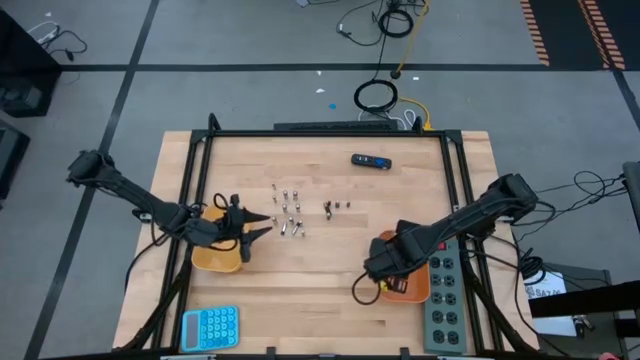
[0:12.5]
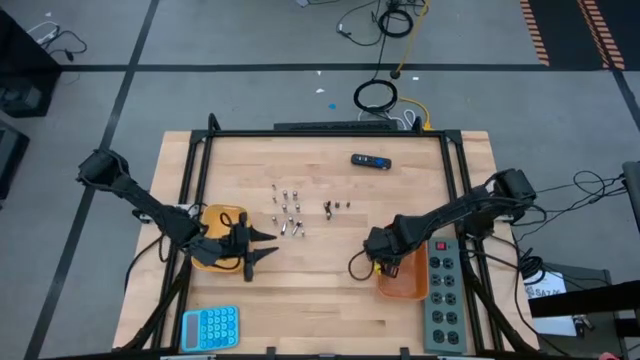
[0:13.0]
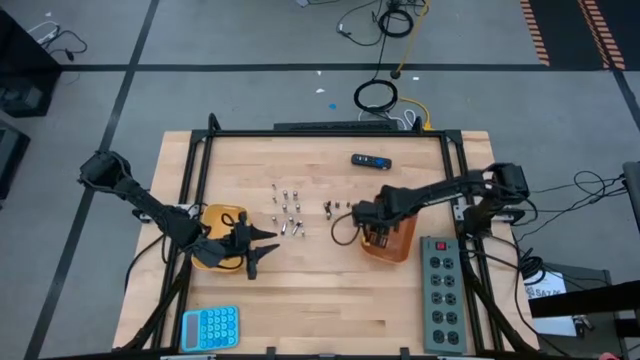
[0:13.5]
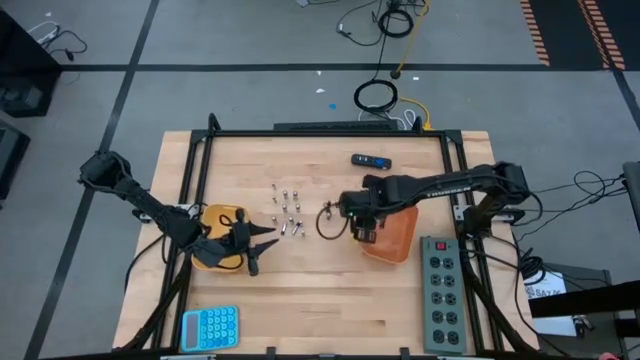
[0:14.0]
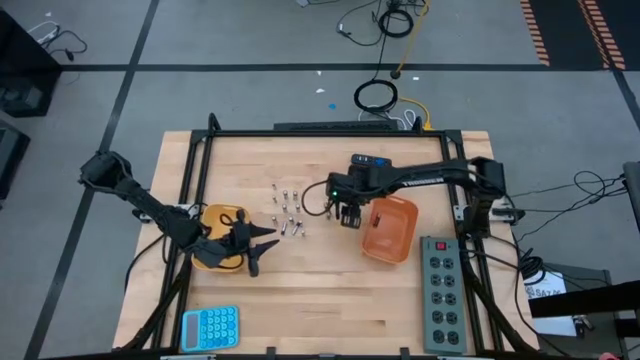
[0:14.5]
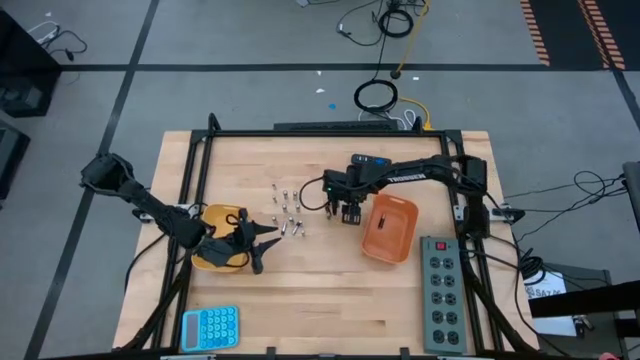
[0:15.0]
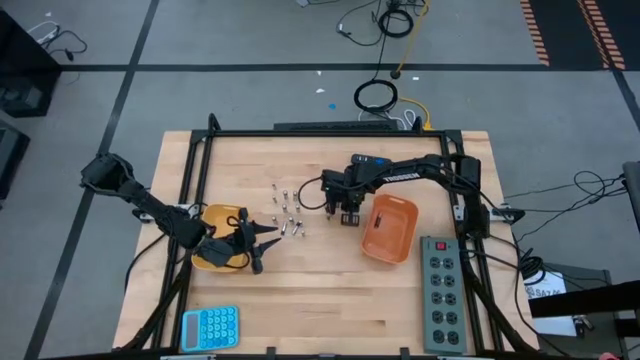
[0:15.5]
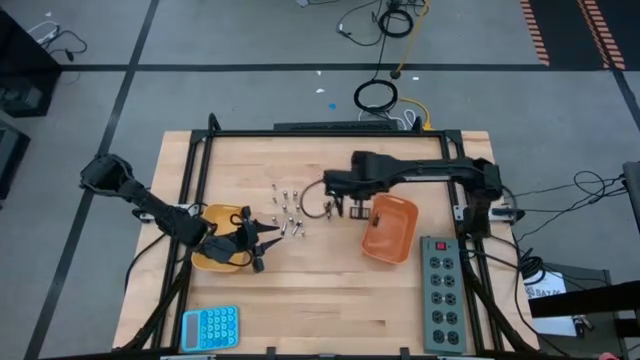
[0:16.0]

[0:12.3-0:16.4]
Task: Sort batteries
Put the black battery into the orange bin

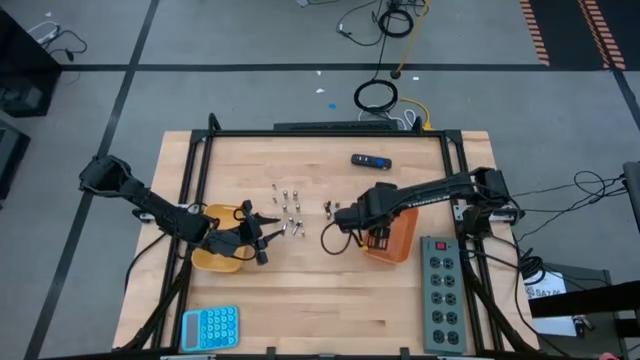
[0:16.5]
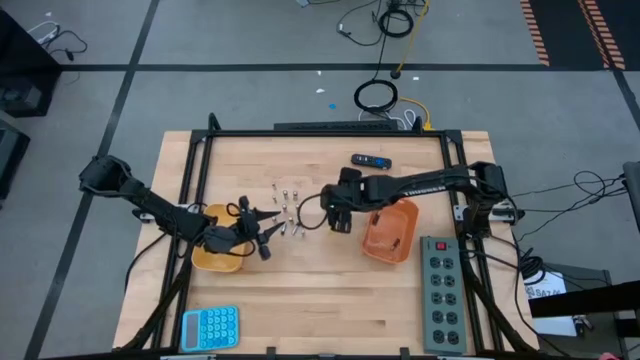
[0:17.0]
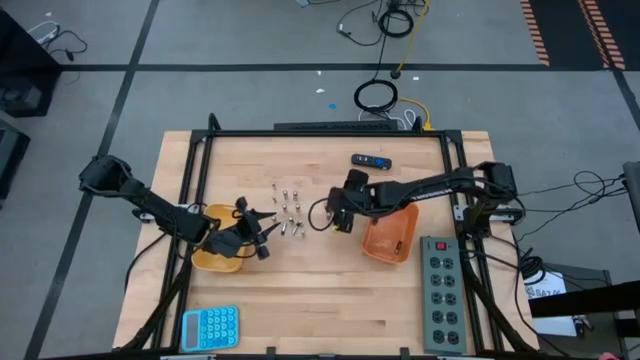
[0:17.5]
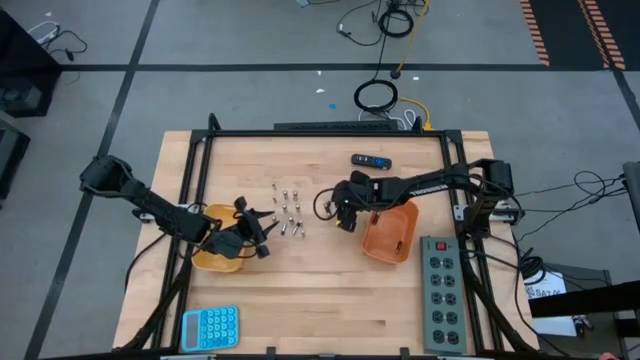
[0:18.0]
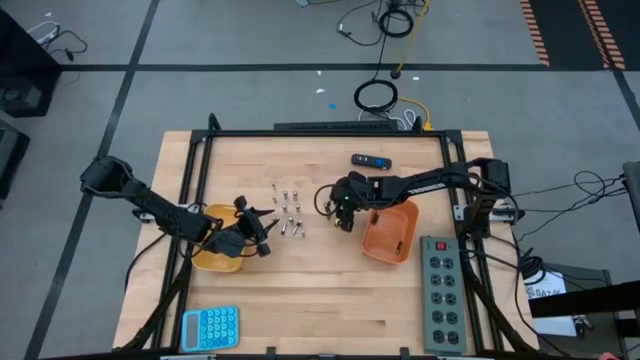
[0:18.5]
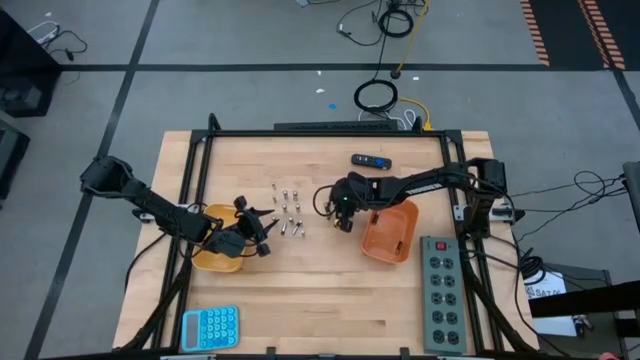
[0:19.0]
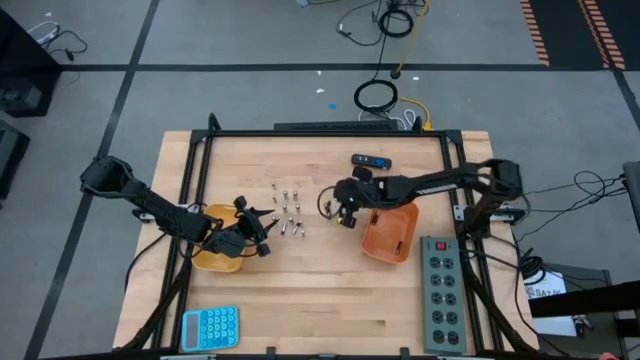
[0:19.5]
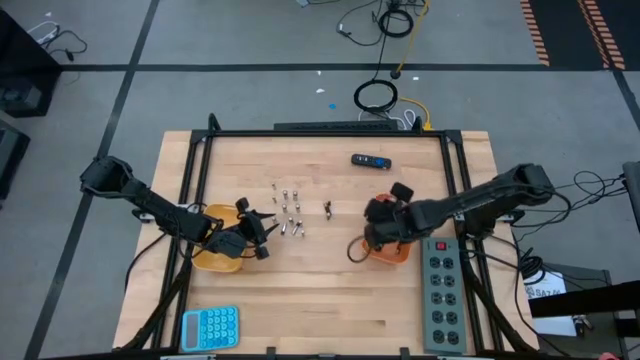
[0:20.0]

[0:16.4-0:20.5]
Put the black battery into the orange bin

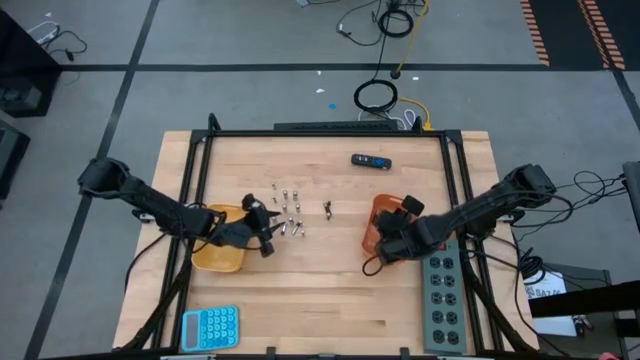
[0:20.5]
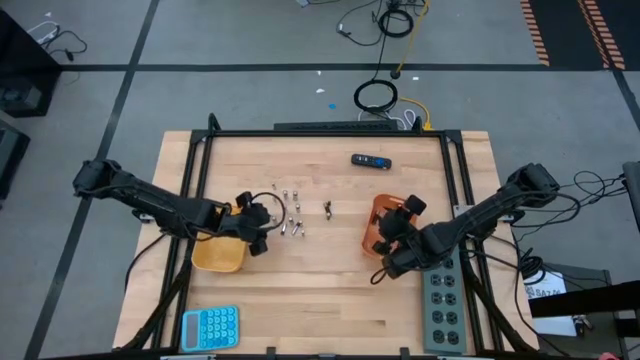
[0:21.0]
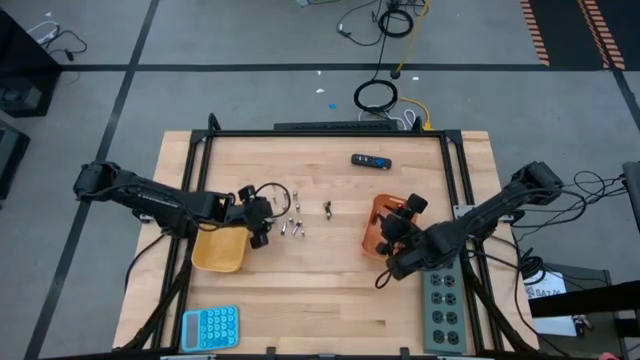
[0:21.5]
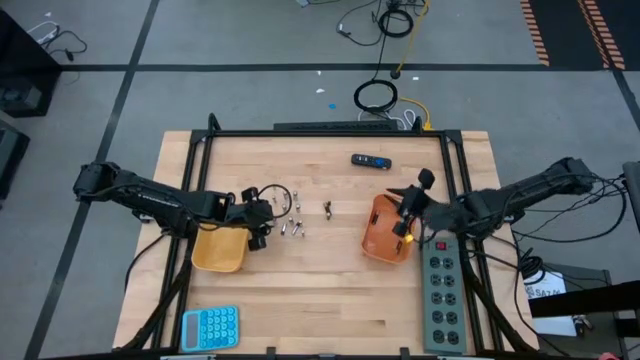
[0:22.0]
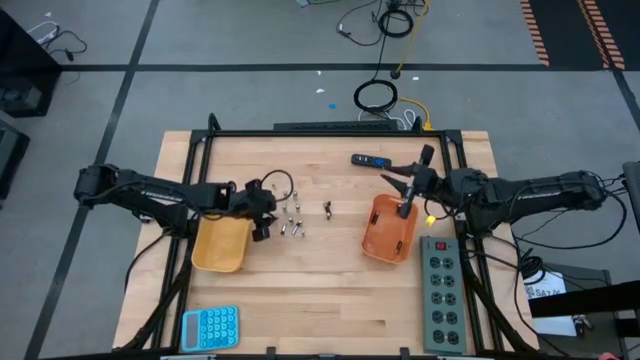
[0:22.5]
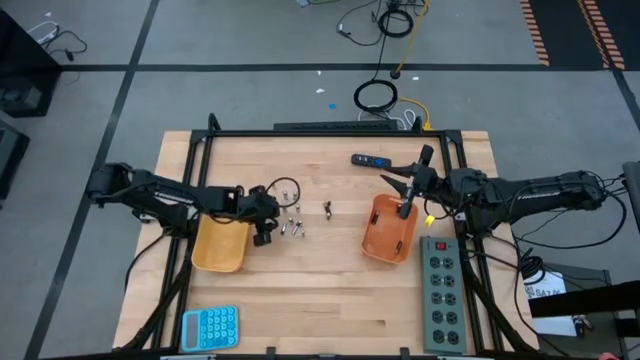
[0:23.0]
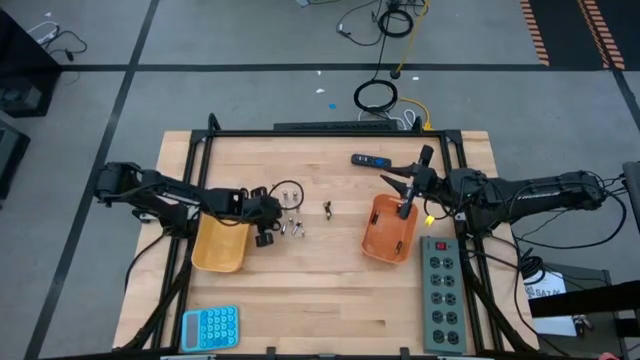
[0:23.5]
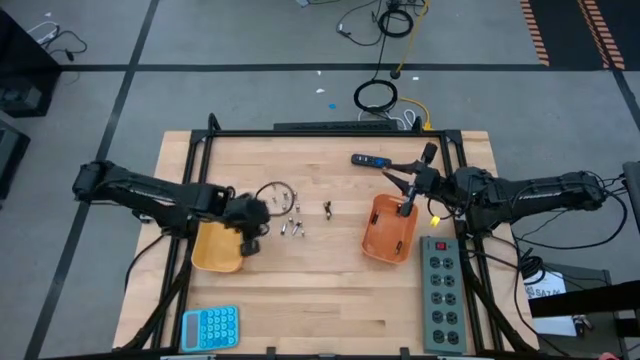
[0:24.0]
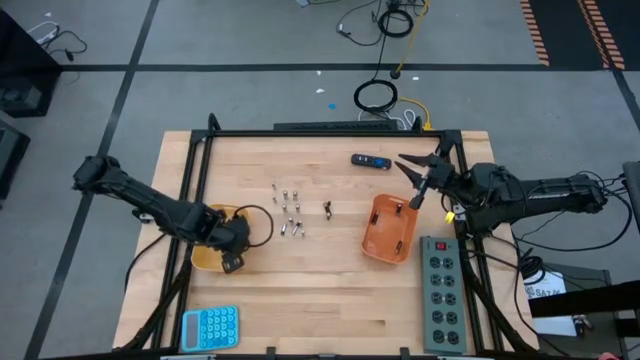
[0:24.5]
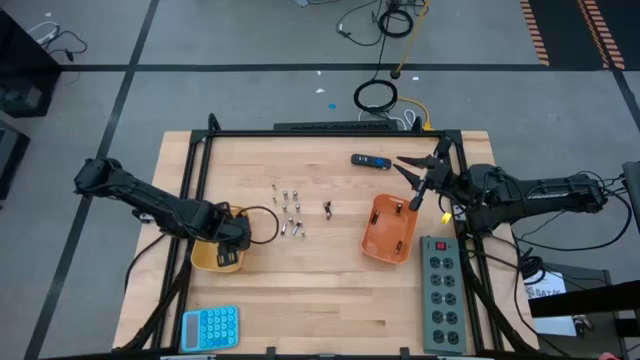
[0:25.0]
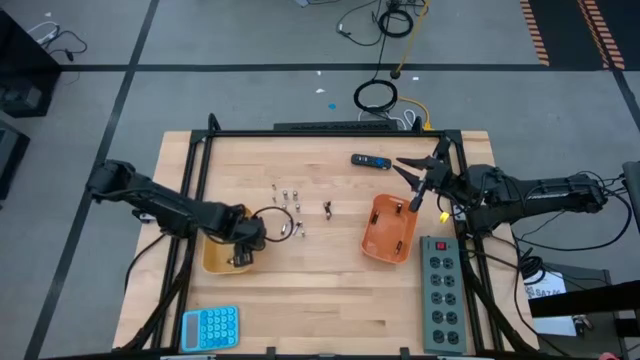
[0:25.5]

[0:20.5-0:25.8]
Put the silver battery into the yellow bin

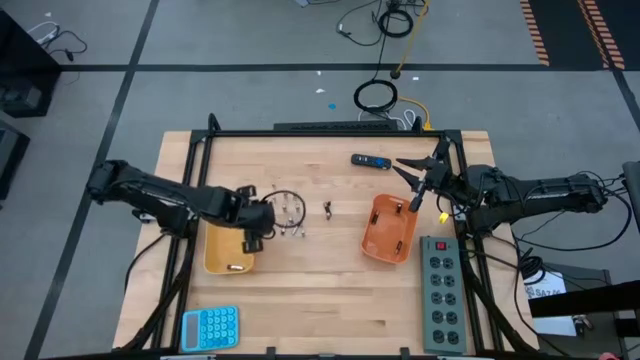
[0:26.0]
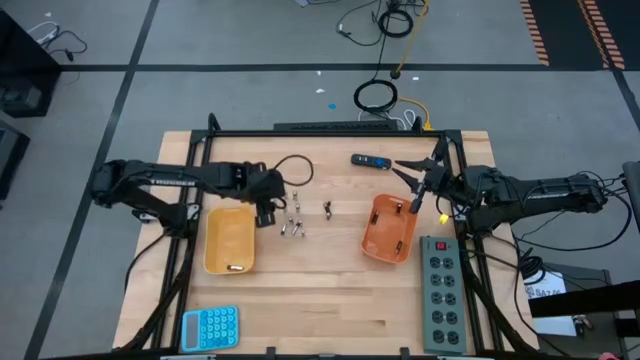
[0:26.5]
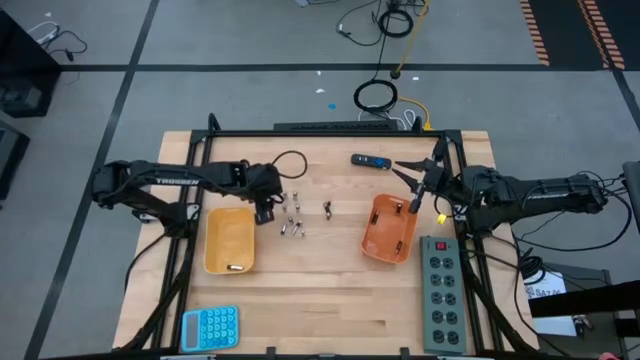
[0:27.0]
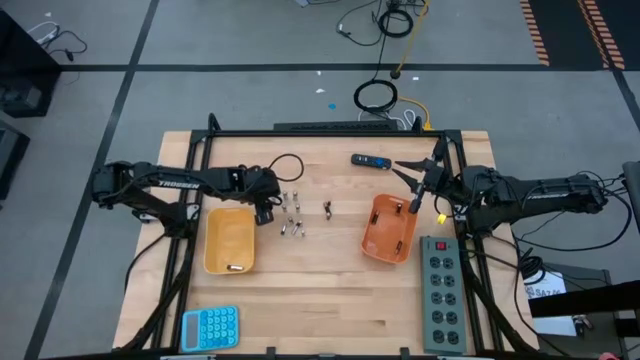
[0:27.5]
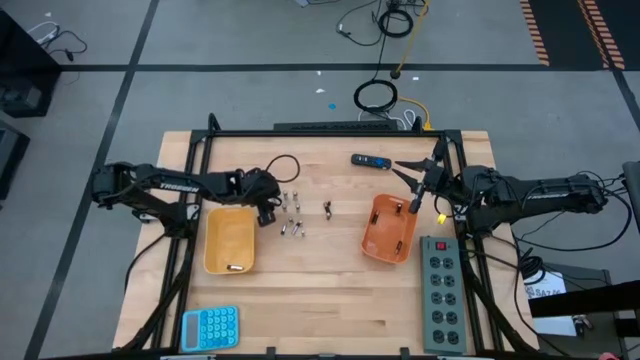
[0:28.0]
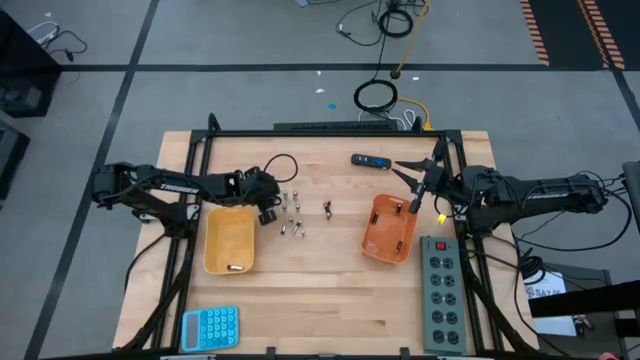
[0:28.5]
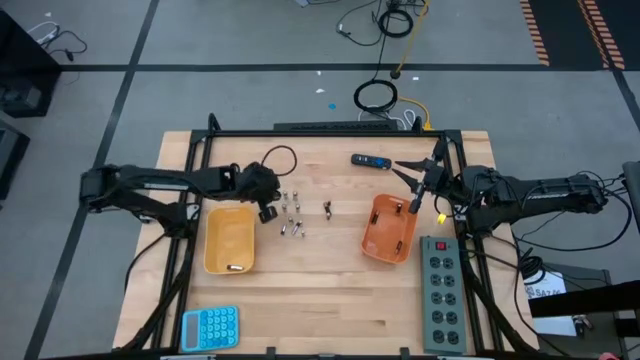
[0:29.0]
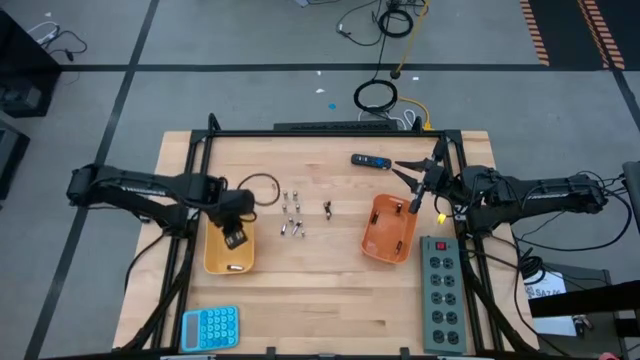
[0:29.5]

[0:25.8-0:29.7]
Put the silver battery into the yellow bin

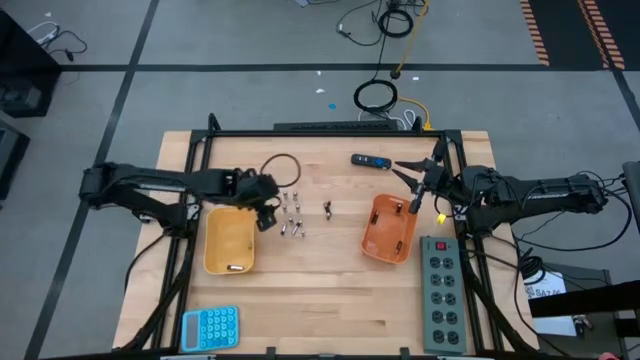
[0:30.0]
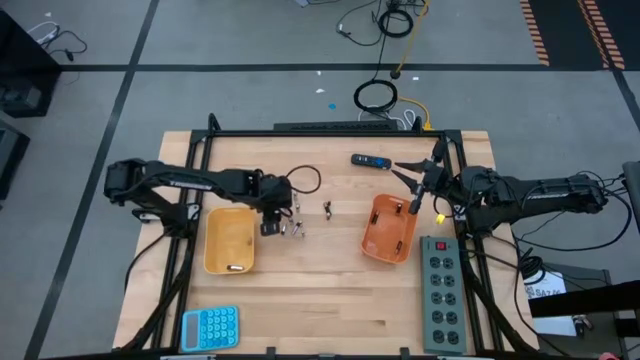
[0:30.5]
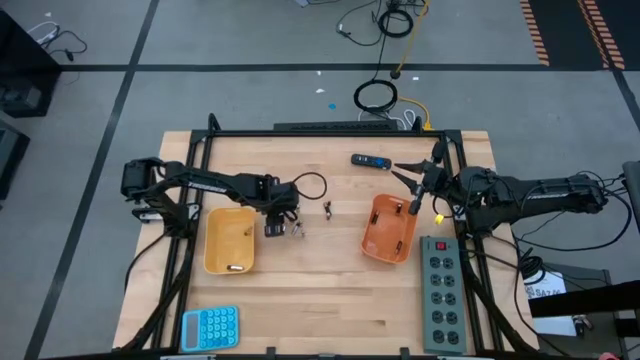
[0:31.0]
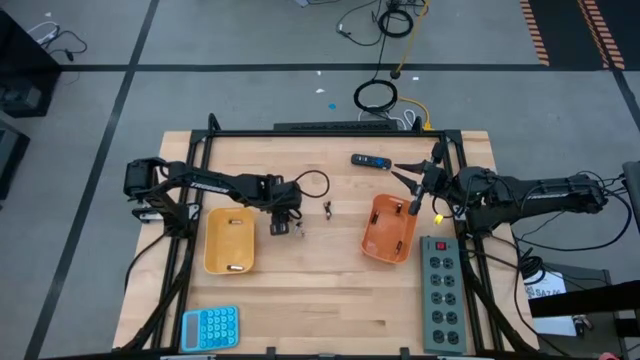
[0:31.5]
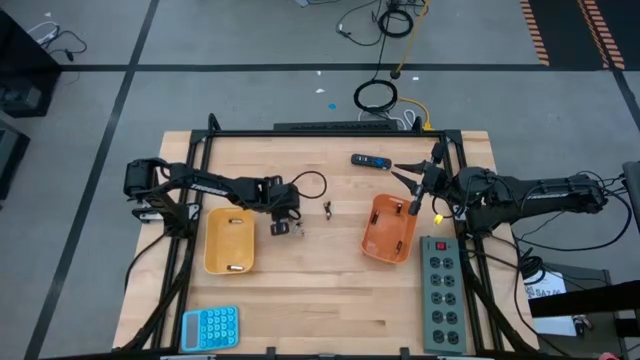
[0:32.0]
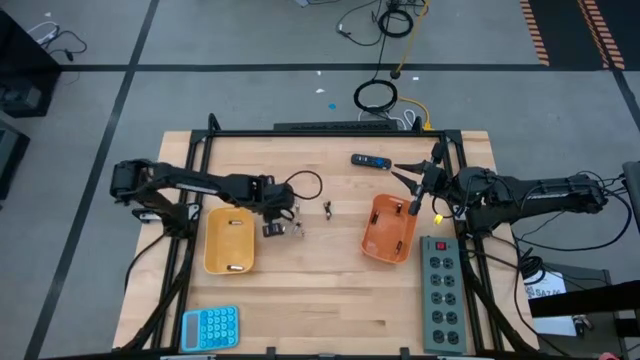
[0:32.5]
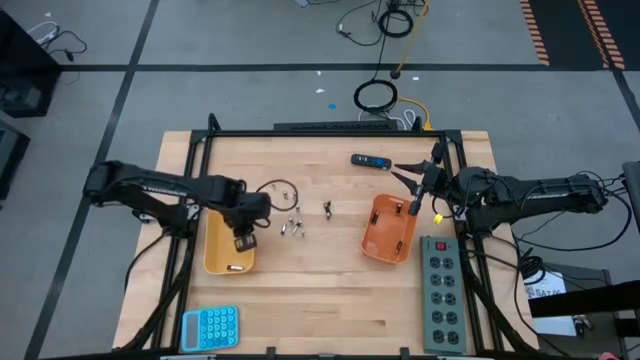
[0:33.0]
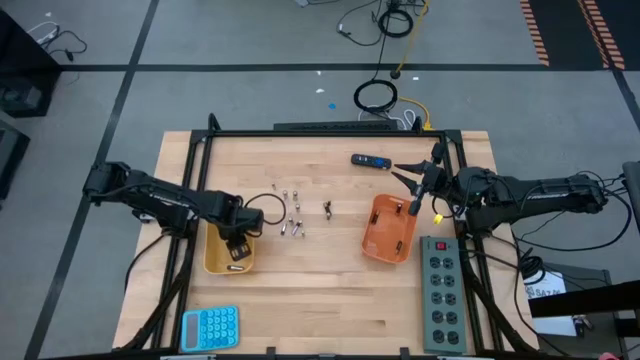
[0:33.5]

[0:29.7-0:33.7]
Put the silver battery into the yellow bin
